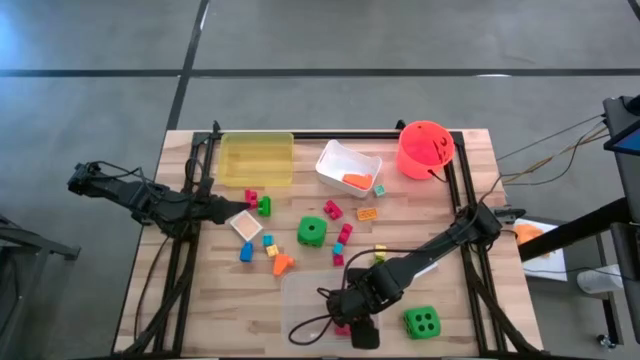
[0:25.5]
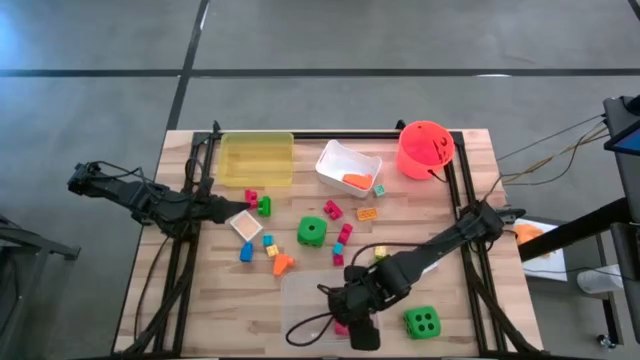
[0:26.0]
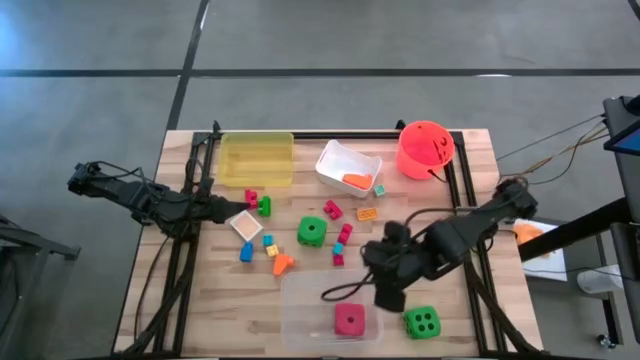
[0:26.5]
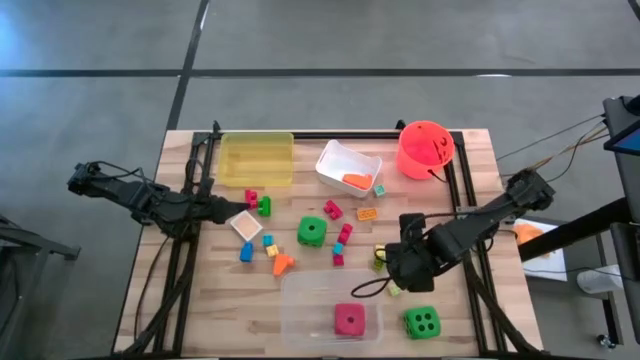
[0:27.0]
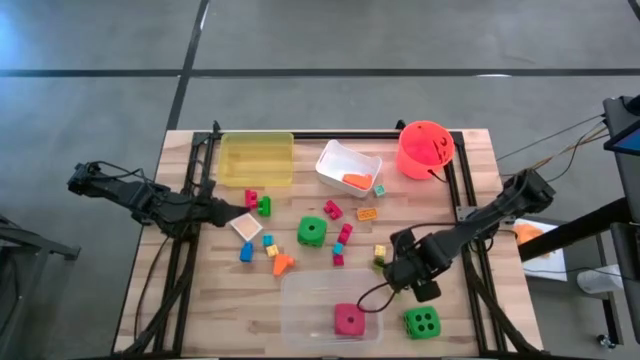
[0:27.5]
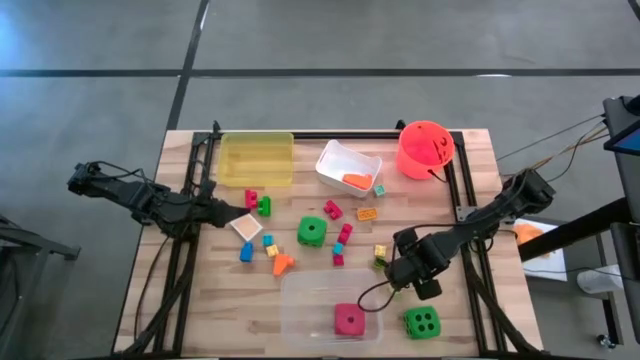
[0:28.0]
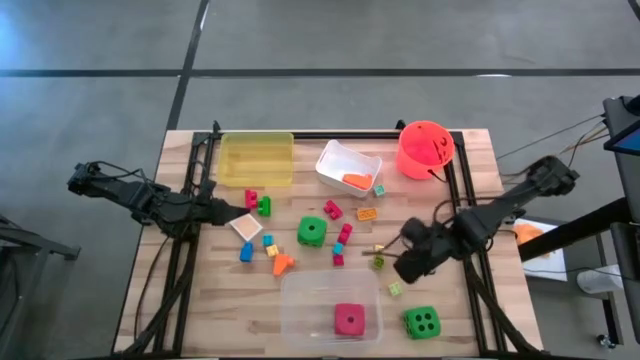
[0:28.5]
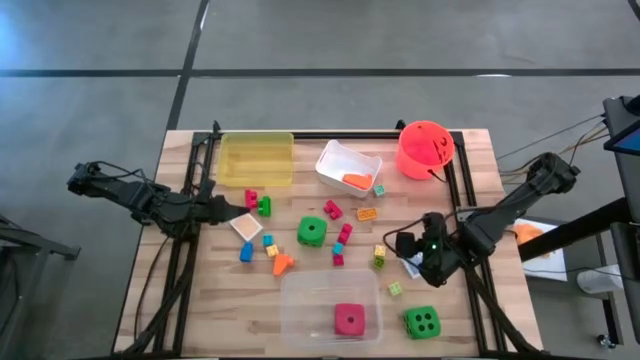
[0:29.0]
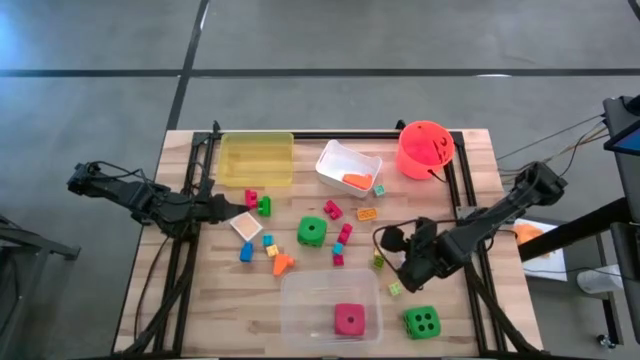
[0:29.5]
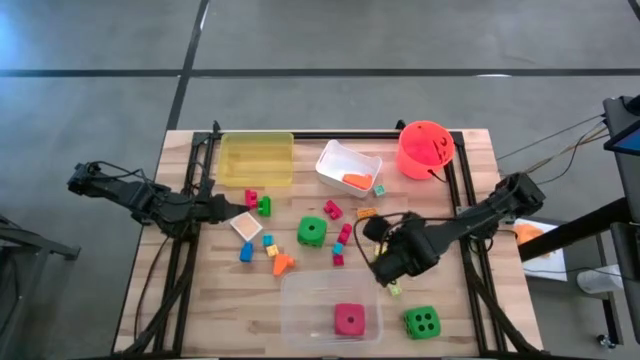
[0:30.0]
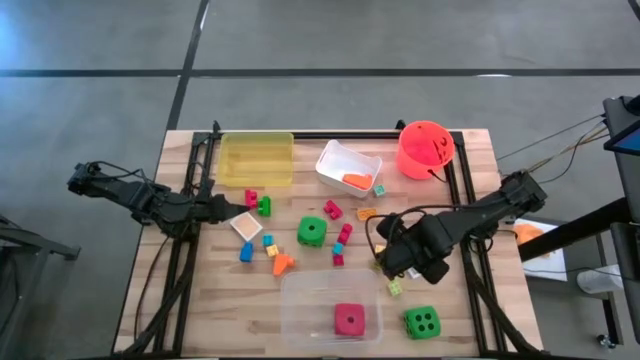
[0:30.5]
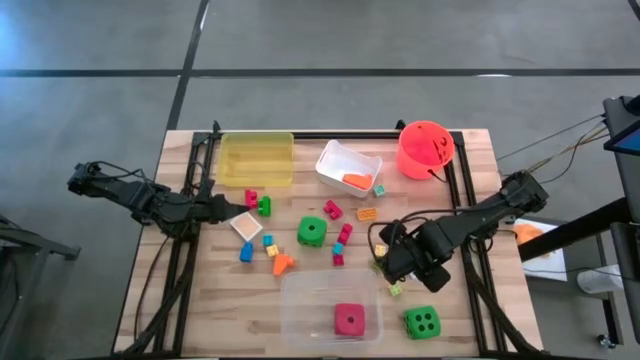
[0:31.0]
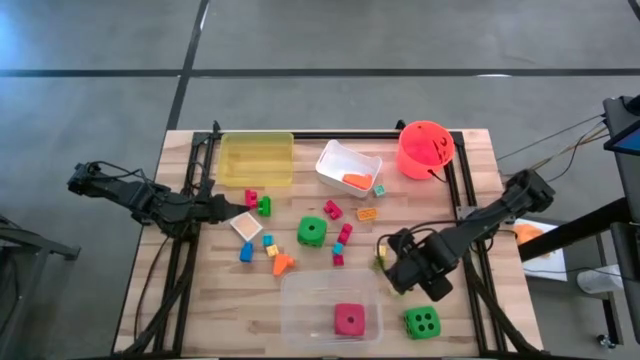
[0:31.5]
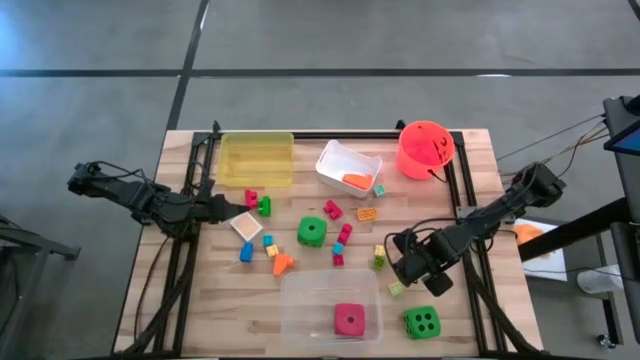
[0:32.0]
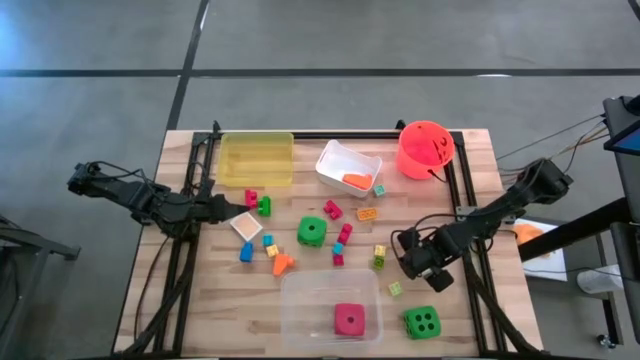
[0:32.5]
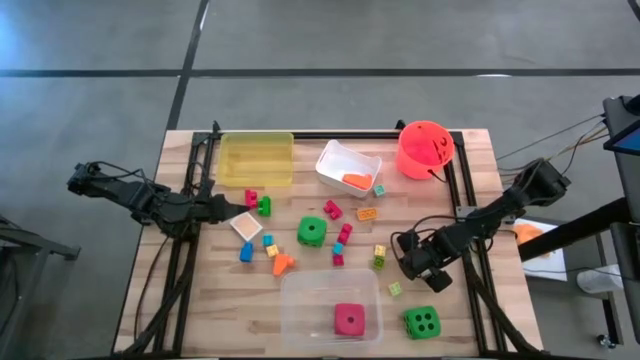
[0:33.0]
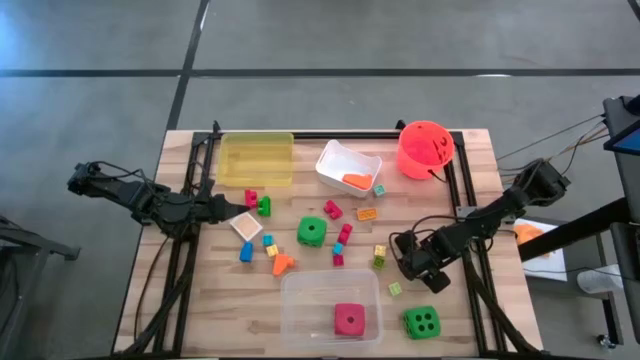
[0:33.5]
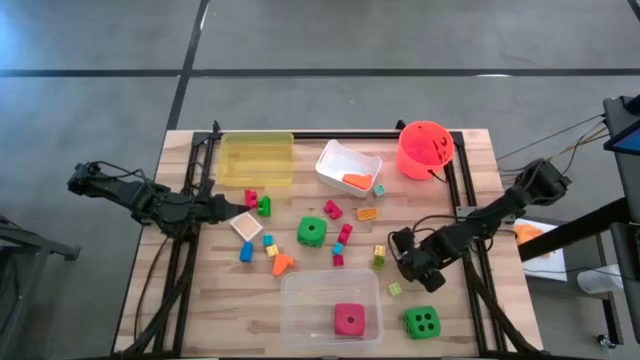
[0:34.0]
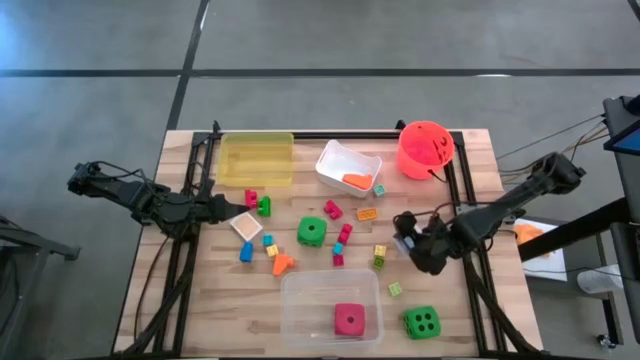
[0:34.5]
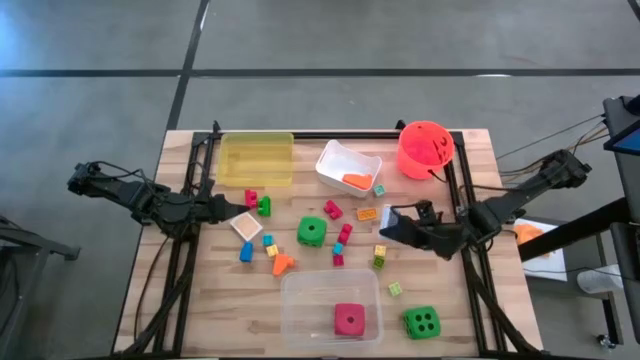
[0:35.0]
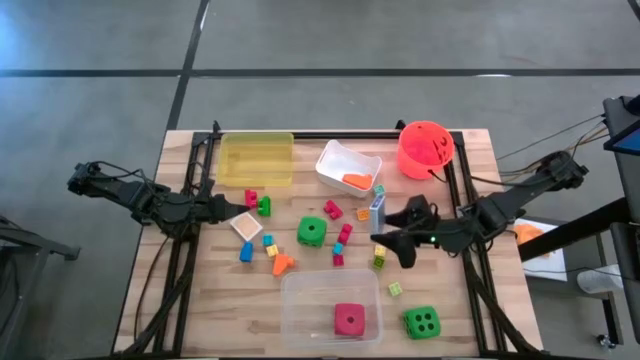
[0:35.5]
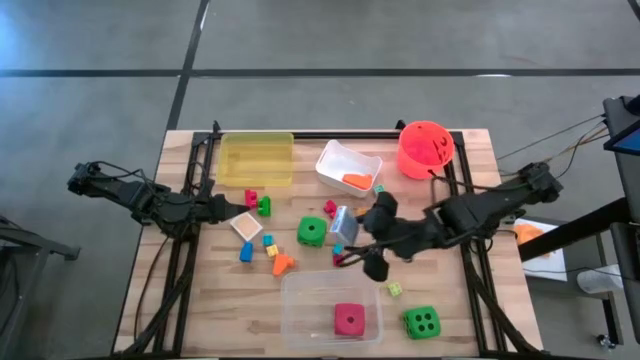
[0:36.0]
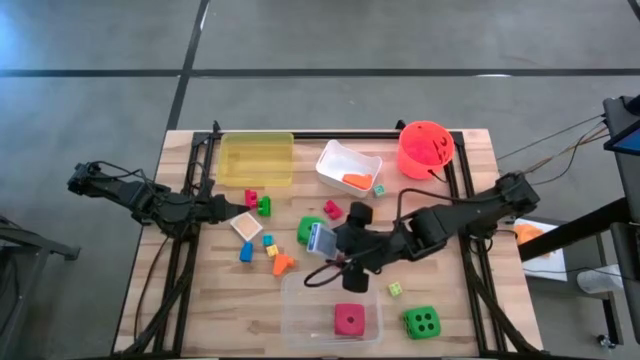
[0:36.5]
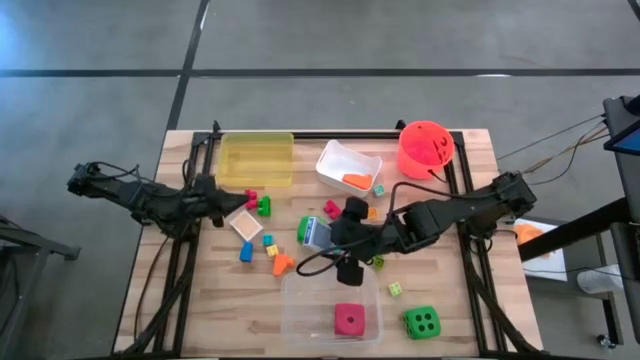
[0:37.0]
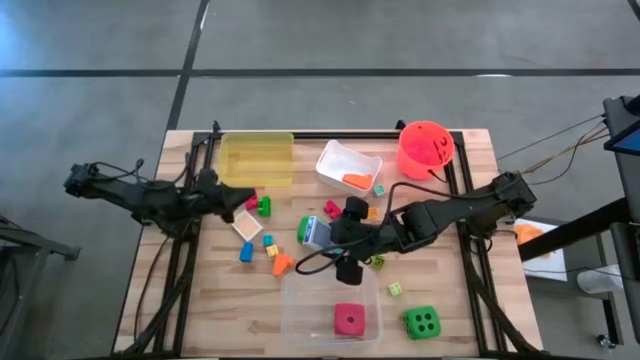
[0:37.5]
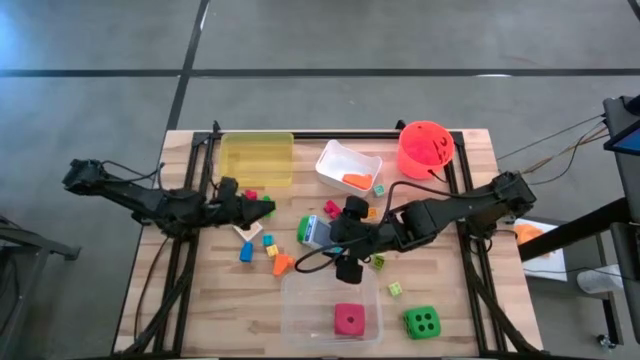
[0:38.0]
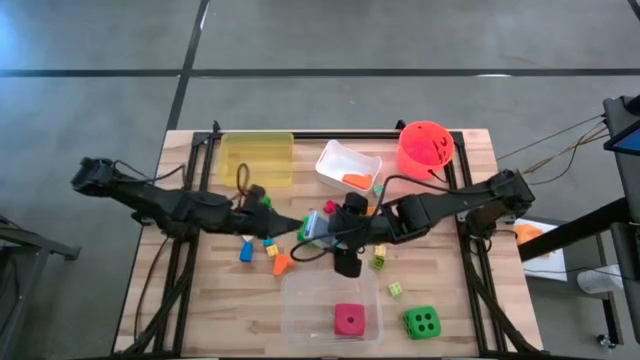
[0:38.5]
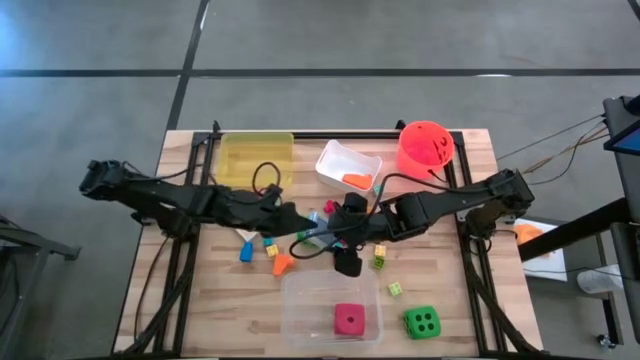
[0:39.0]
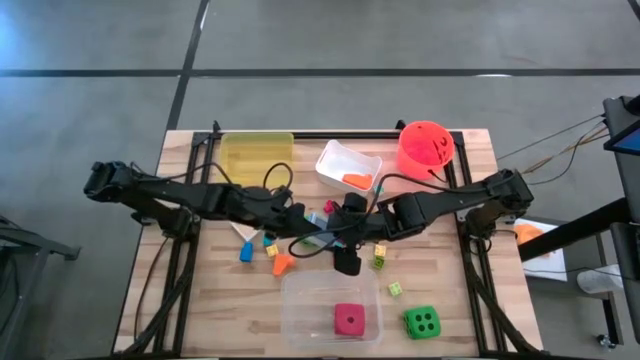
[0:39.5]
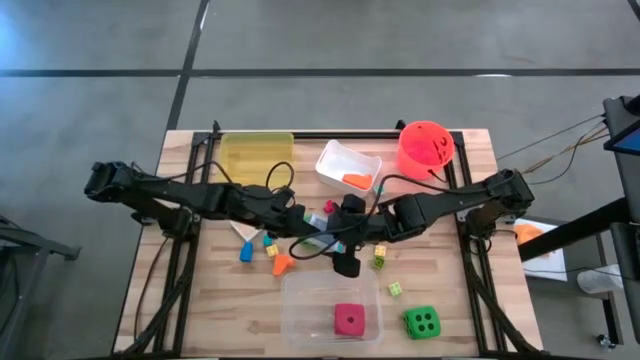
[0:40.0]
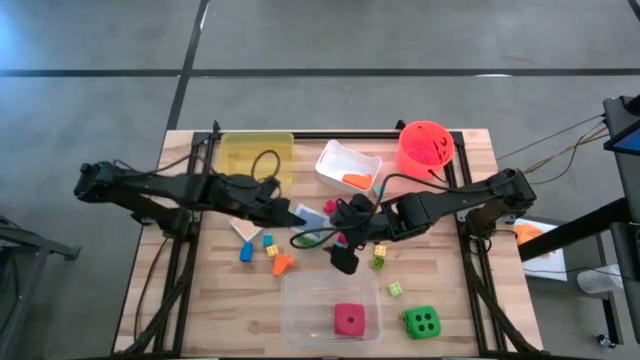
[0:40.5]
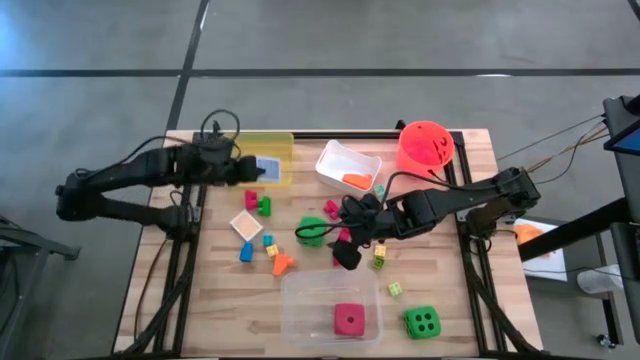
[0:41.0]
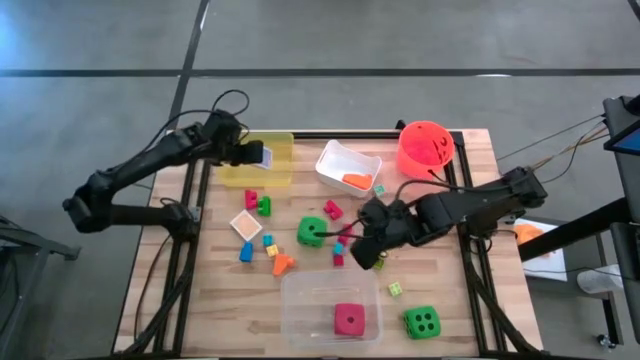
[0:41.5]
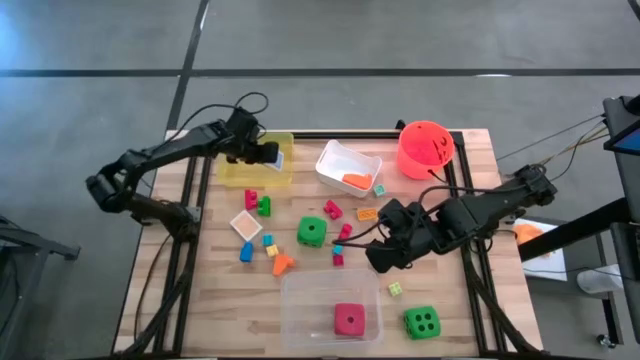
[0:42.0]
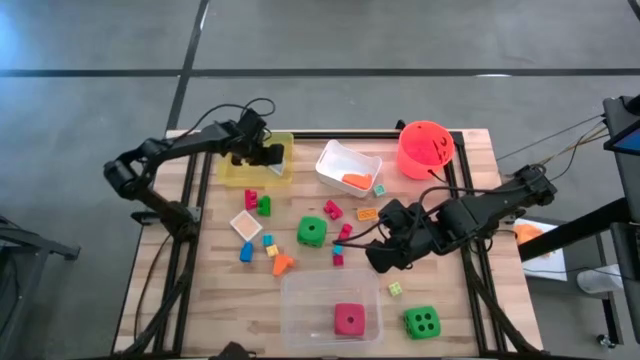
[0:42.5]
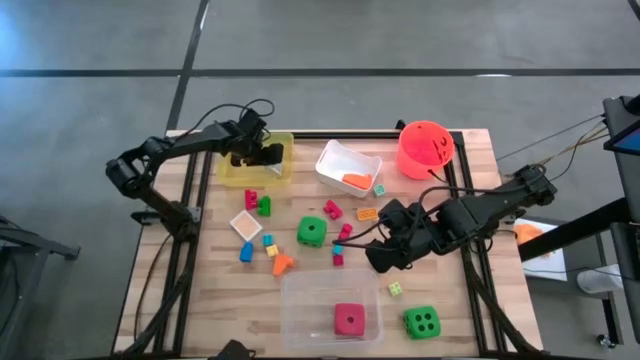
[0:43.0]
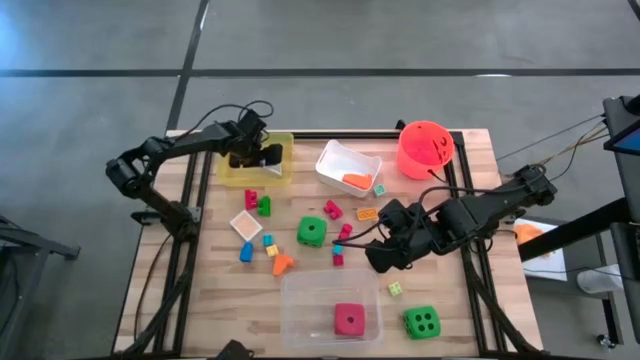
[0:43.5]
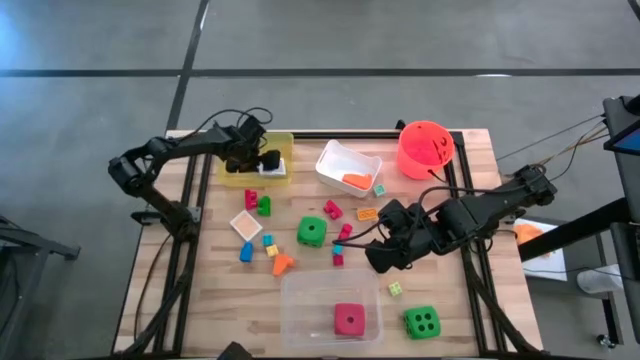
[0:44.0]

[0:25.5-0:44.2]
Task: Pick & Place Toys
Put the blue deck of cards into the yellow bin
